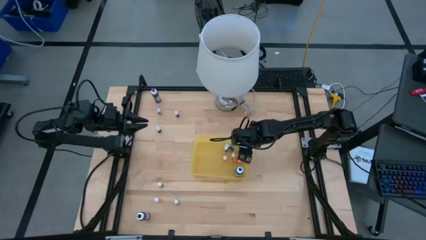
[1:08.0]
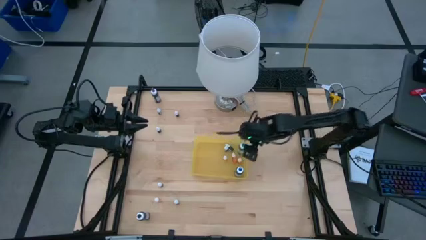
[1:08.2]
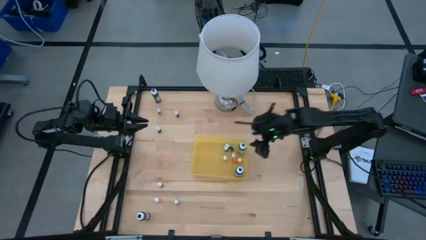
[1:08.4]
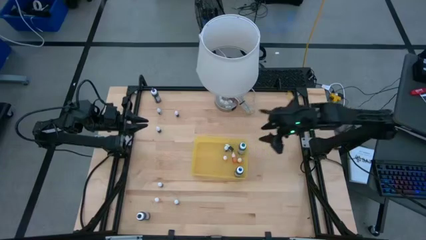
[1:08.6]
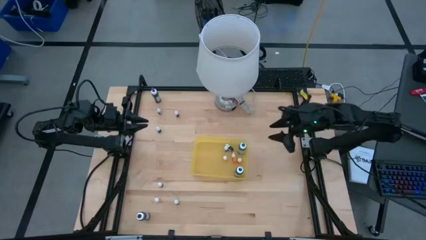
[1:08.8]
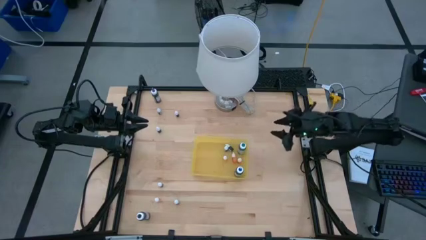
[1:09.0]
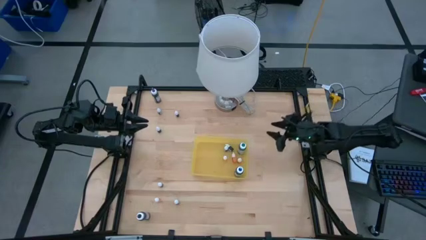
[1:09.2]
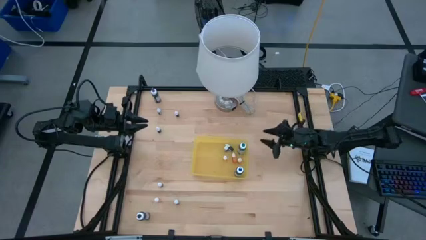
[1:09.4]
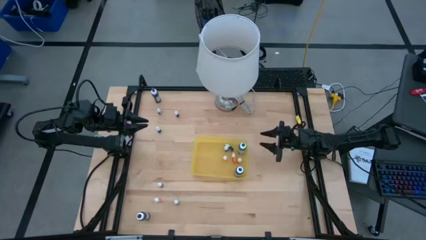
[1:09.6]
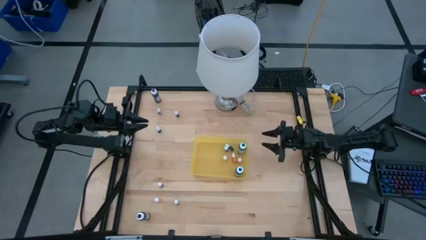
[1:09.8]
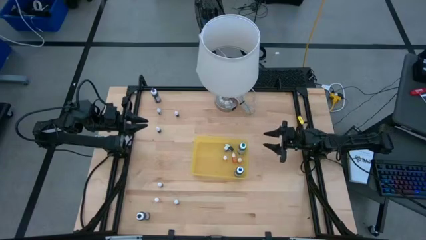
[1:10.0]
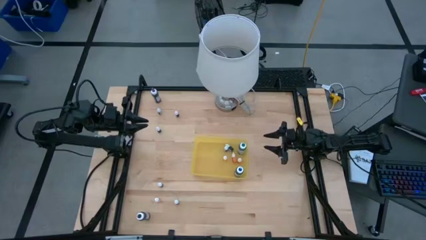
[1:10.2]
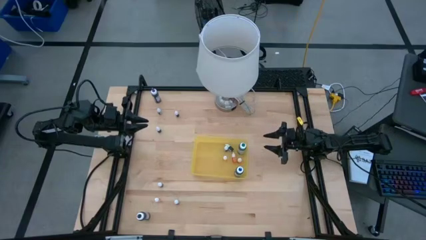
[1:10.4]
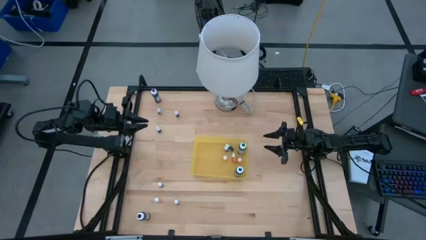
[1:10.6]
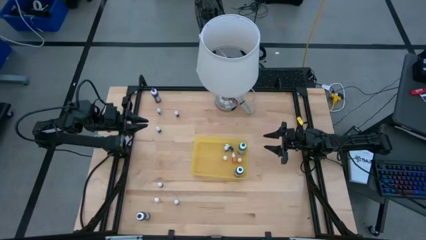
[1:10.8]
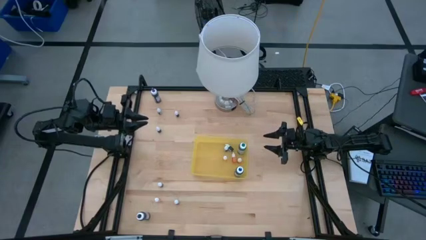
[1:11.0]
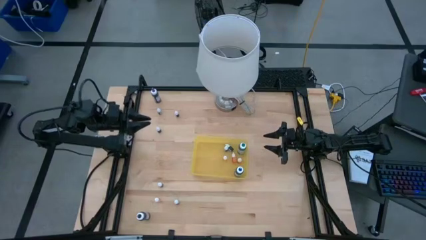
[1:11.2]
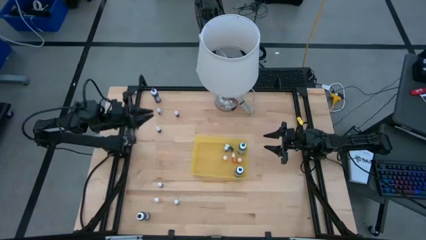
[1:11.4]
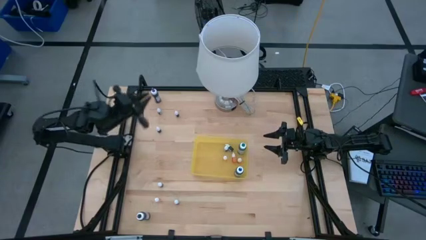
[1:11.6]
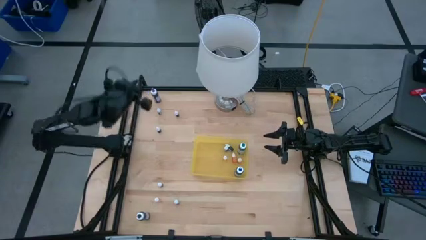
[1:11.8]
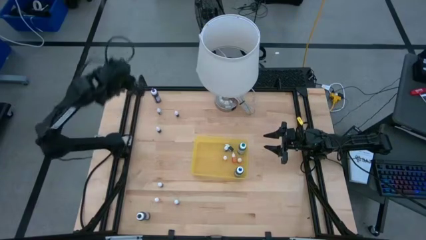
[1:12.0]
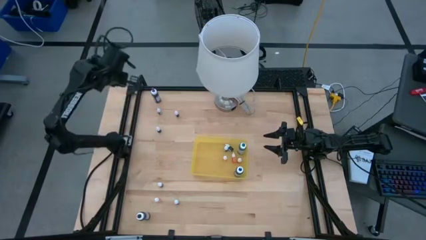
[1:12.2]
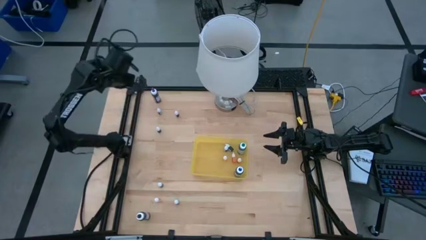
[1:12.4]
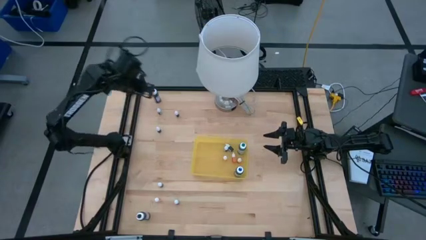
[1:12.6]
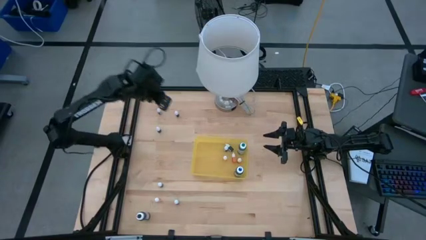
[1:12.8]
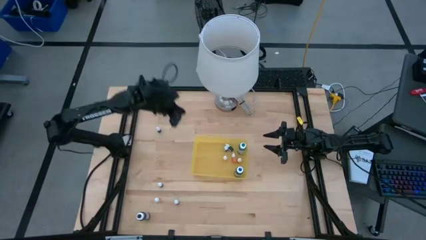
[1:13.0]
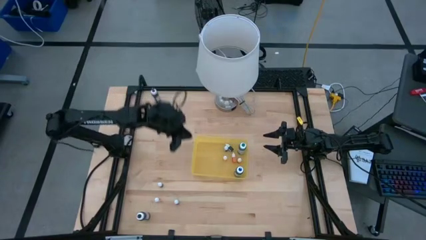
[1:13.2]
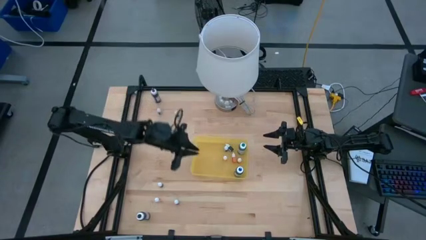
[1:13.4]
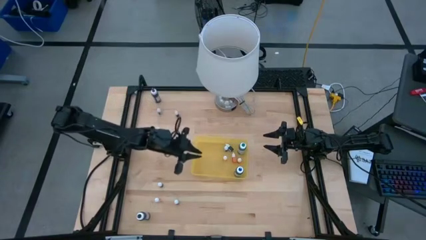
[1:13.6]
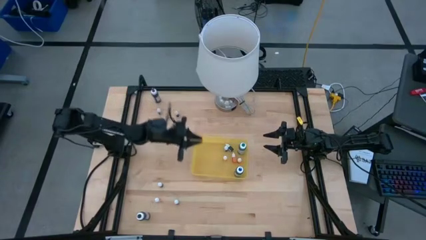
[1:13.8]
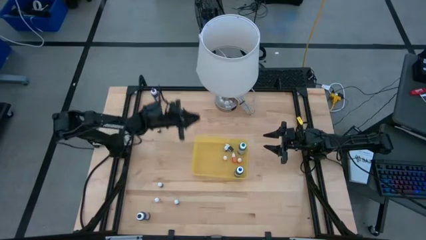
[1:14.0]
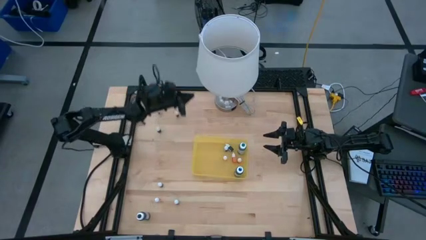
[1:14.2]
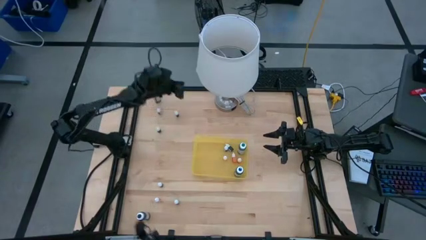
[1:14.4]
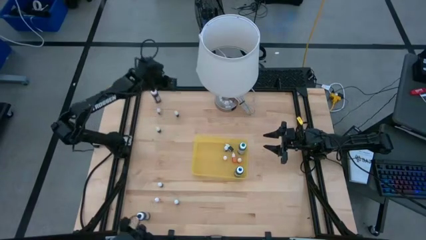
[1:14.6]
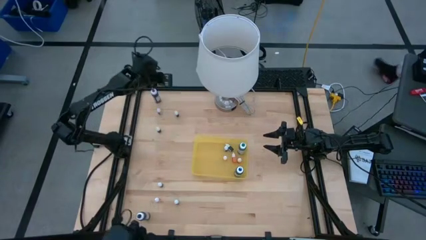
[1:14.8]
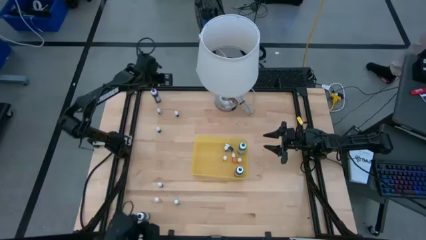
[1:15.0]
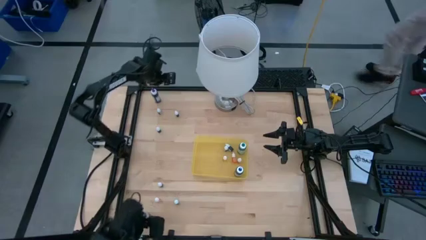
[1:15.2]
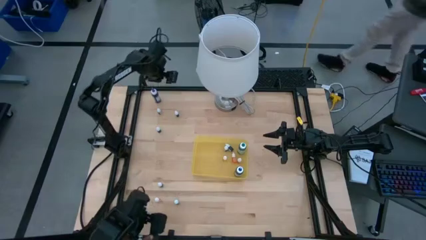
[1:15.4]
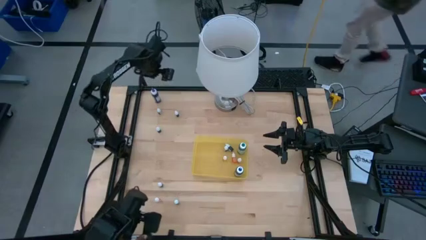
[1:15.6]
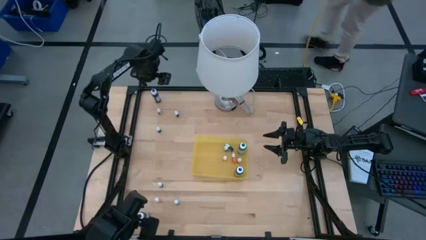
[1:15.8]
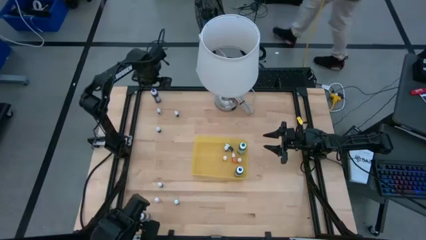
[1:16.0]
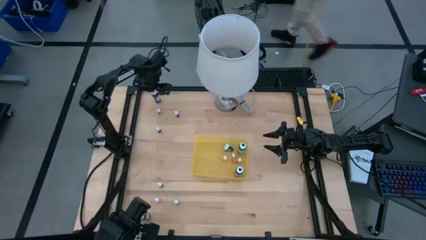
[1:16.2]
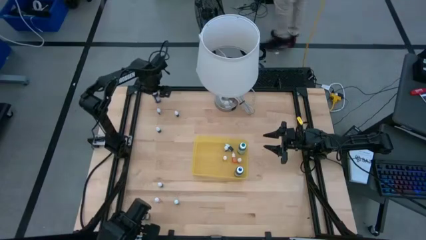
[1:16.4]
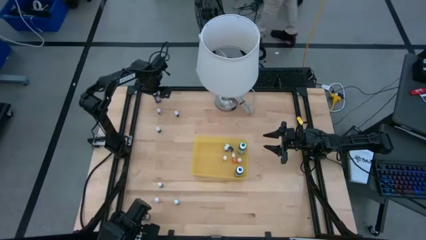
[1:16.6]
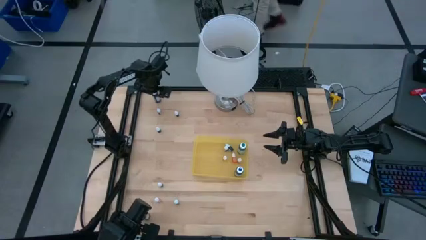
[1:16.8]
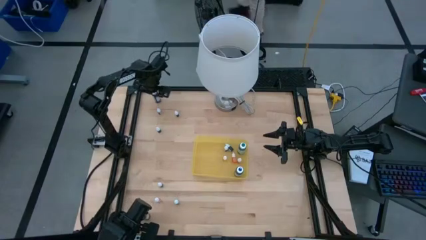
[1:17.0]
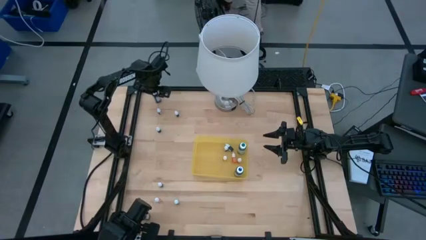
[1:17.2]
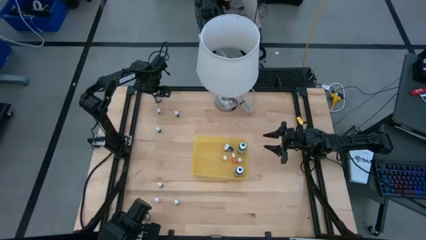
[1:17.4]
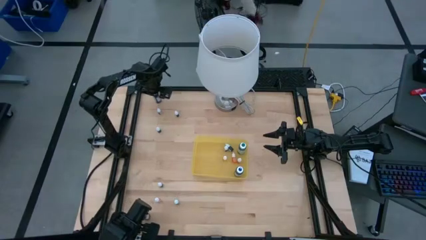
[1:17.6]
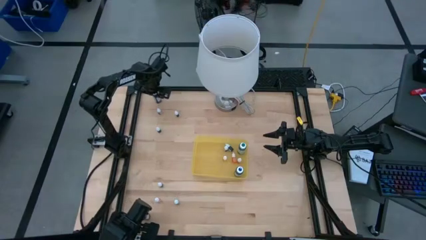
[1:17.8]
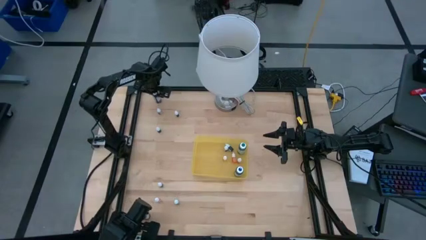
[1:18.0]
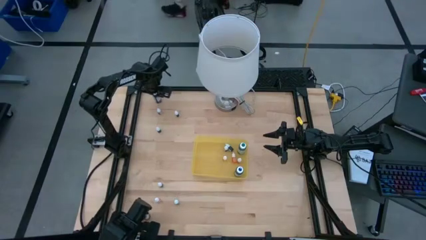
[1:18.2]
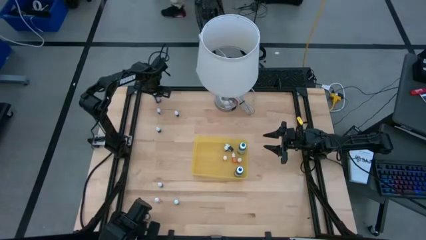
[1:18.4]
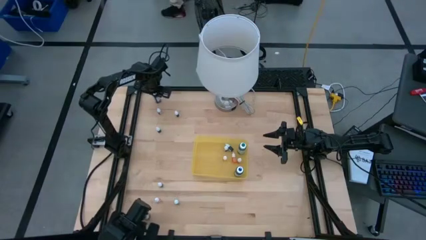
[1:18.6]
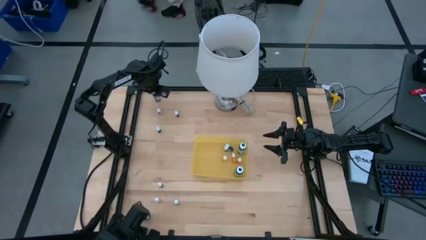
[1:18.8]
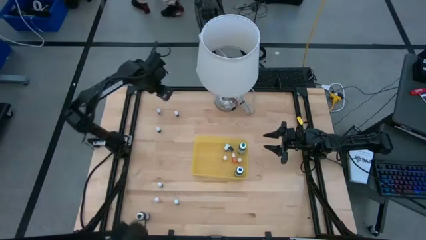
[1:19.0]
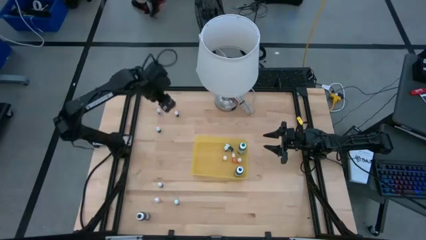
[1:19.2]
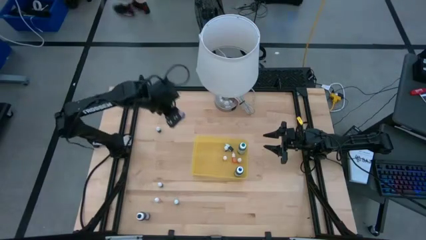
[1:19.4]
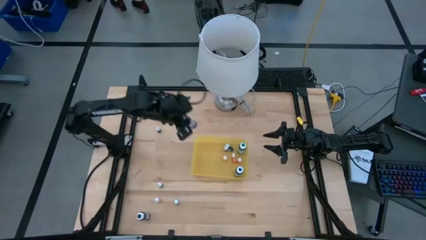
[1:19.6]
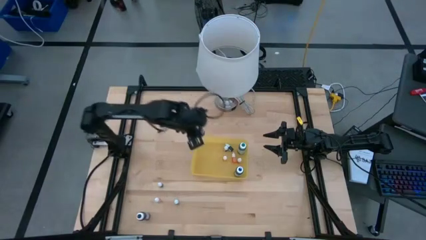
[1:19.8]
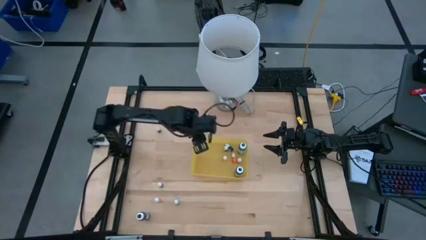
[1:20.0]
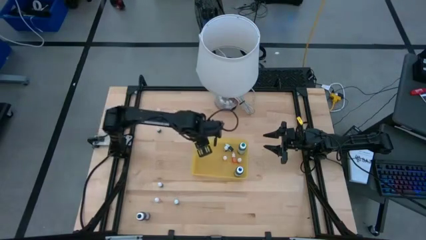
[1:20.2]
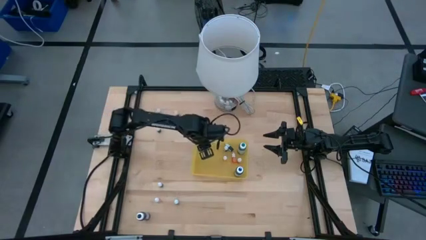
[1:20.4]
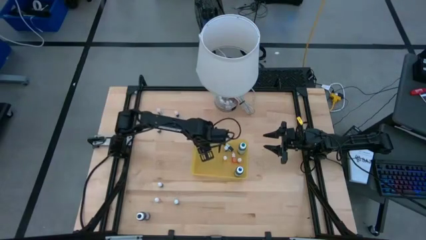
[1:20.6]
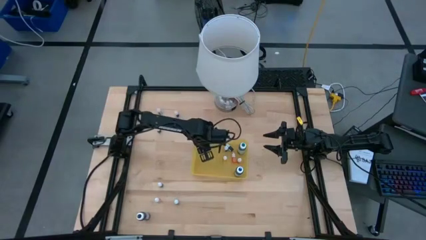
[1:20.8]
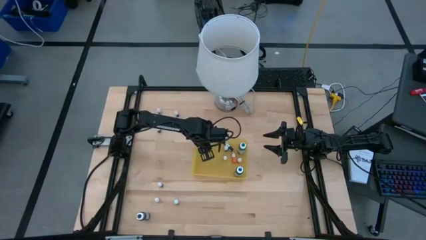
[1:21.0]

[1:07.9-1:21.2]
Task: Pick & Place food coloring
Put the purple food coloring bottle into the yellow bin

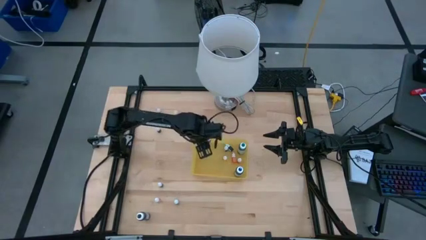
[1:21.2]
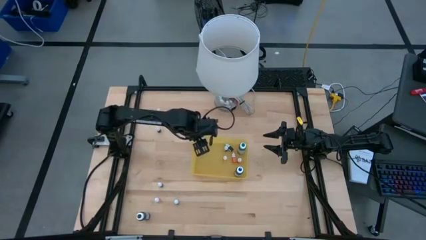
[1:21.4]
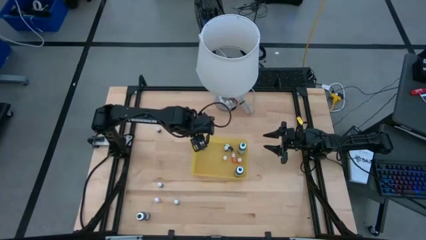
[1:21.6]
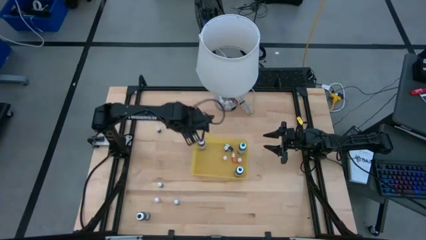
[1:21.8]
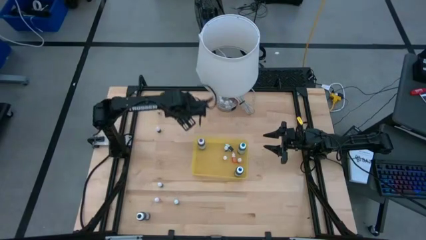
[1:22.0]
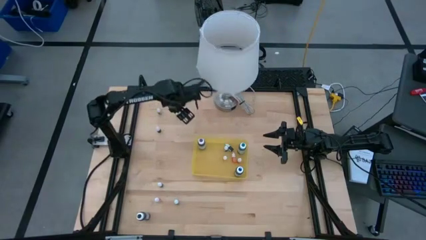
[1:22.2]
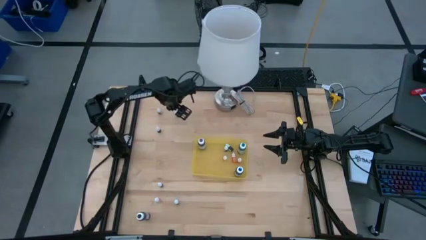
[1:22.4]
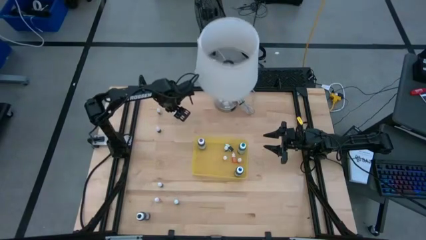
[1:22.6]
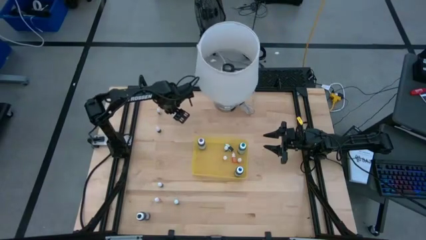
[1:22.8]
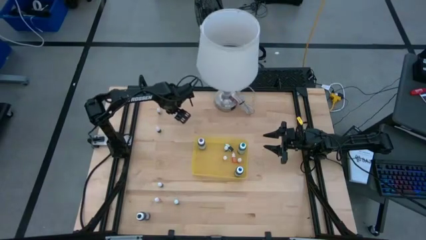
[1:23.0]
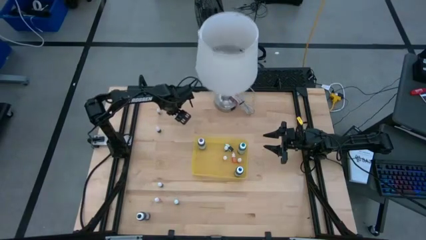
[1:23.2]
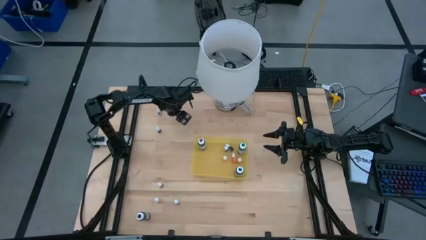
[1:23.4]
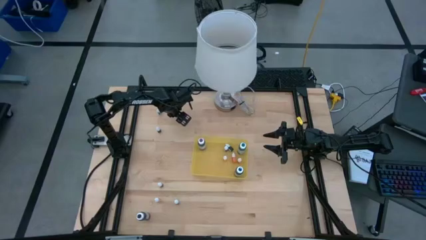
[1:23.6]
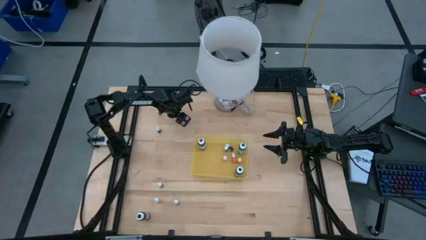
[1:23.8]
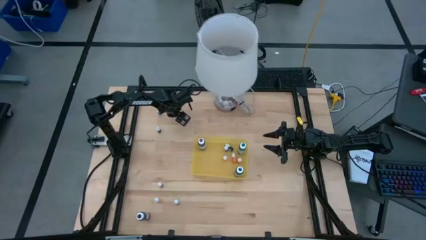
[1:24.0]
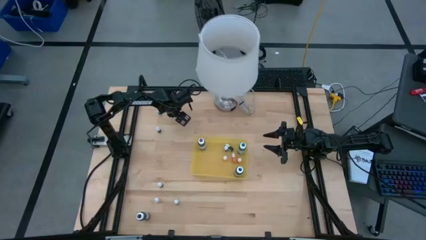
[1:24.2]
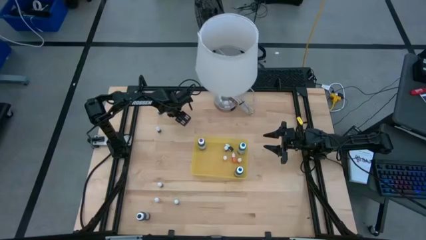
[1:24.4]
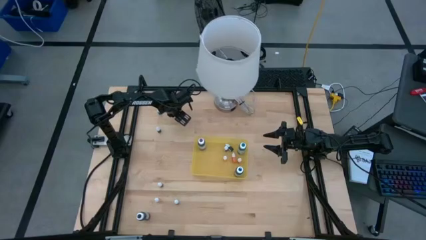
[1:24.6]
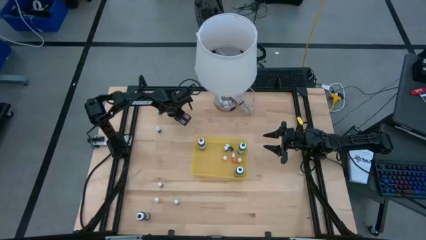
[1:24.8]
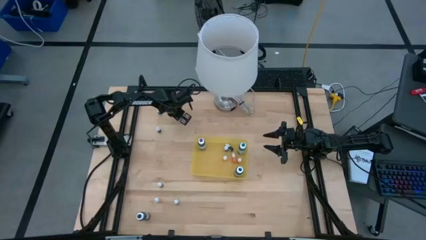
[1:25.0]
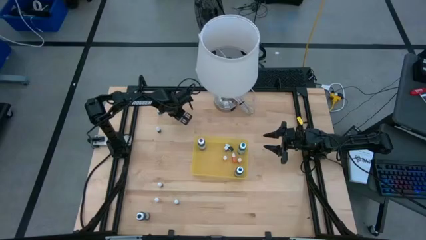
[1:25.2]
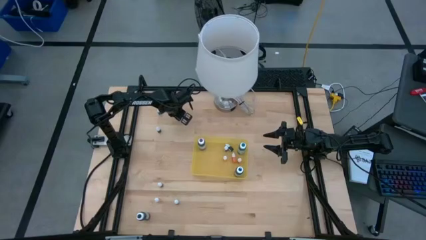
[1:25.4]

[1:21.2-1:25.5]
Put the red food coloring bottle into the yellow bin
